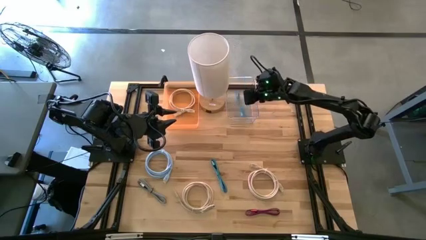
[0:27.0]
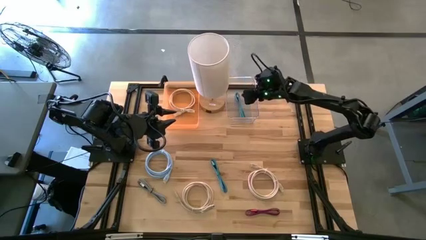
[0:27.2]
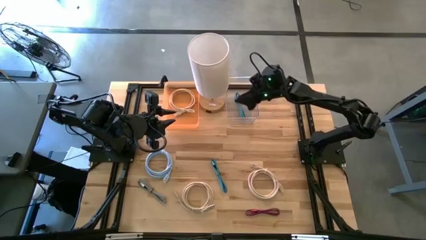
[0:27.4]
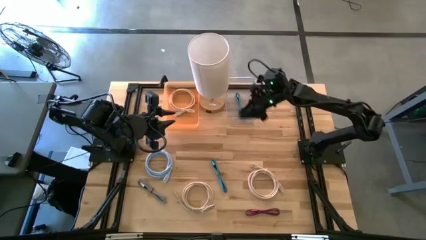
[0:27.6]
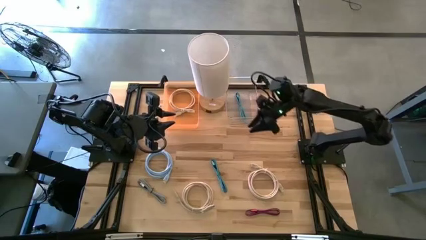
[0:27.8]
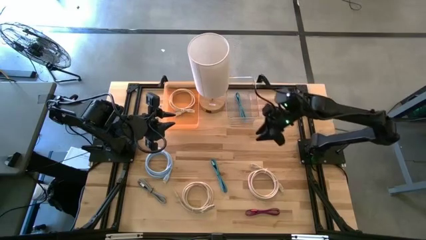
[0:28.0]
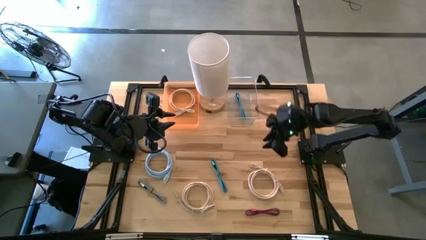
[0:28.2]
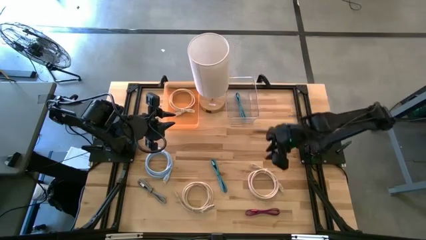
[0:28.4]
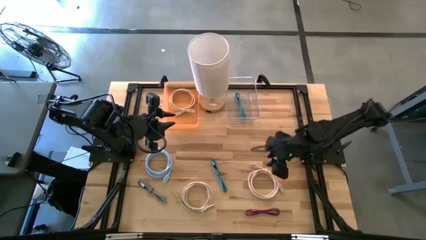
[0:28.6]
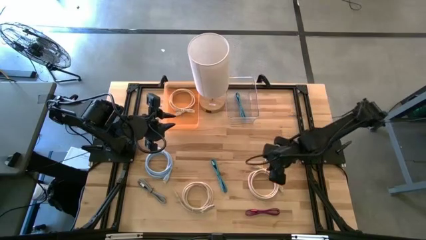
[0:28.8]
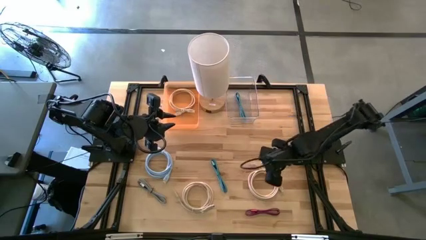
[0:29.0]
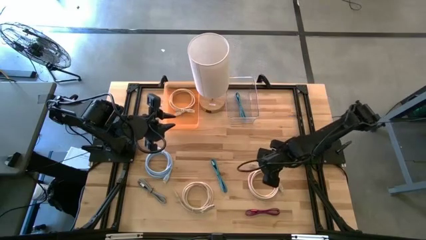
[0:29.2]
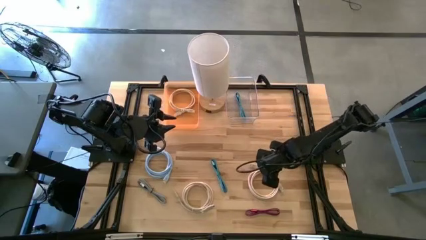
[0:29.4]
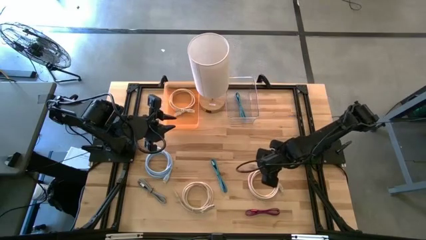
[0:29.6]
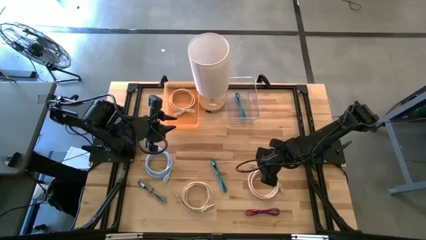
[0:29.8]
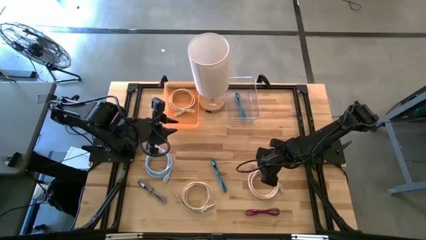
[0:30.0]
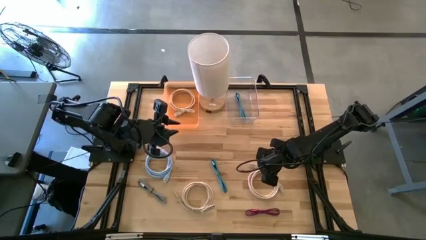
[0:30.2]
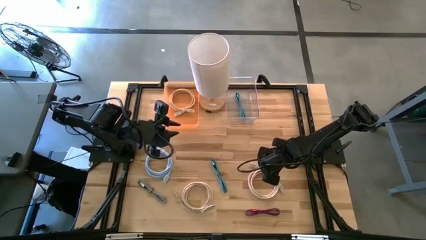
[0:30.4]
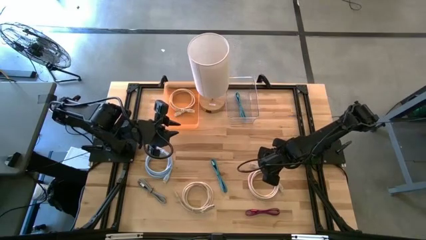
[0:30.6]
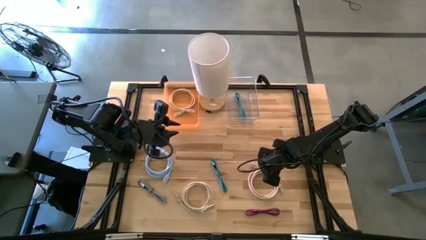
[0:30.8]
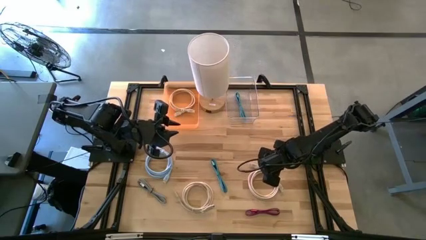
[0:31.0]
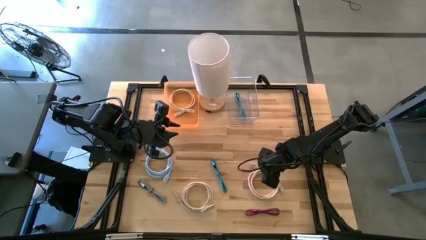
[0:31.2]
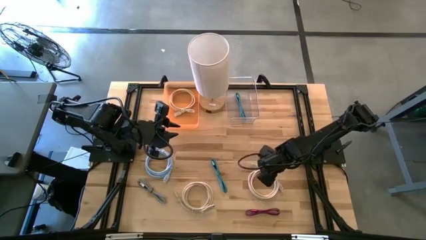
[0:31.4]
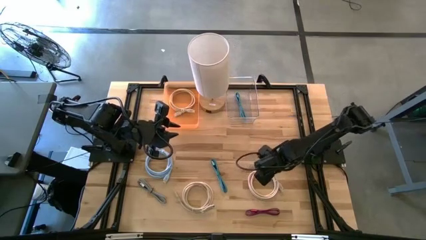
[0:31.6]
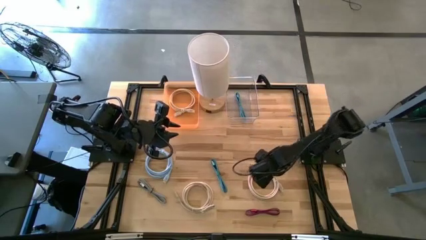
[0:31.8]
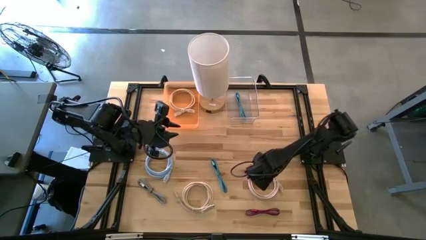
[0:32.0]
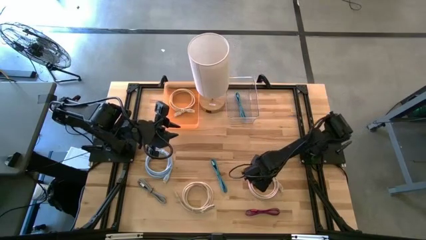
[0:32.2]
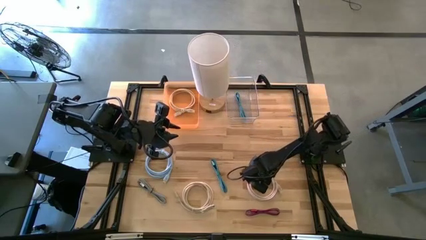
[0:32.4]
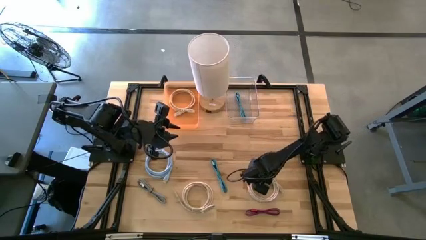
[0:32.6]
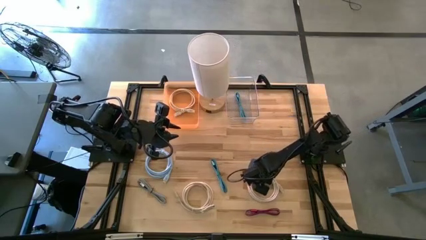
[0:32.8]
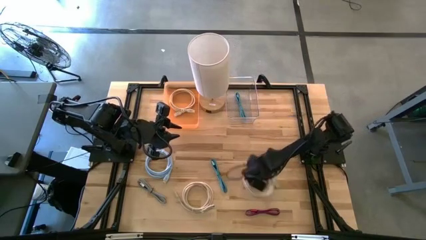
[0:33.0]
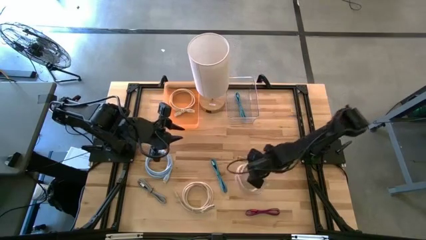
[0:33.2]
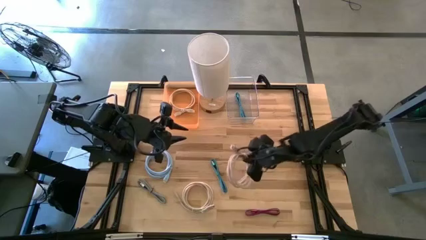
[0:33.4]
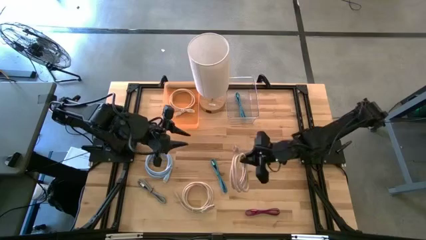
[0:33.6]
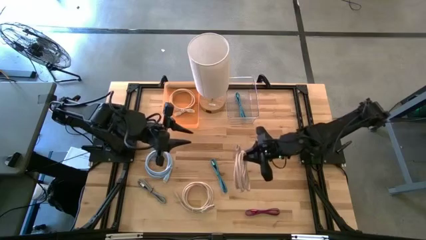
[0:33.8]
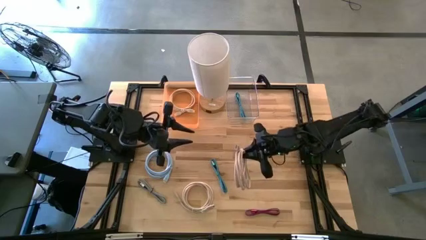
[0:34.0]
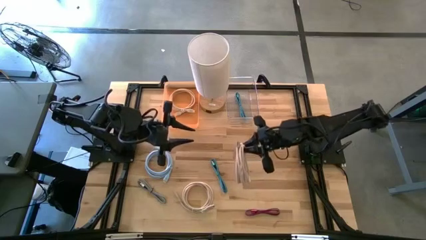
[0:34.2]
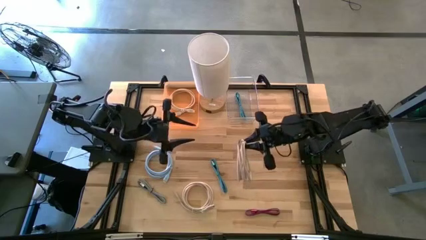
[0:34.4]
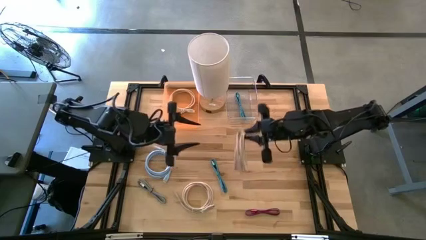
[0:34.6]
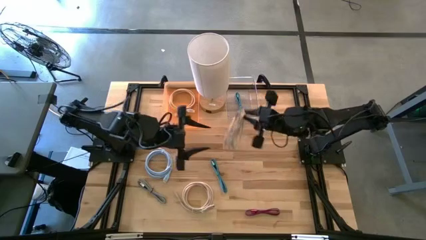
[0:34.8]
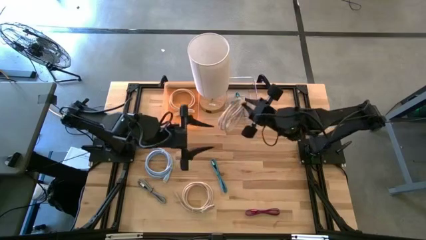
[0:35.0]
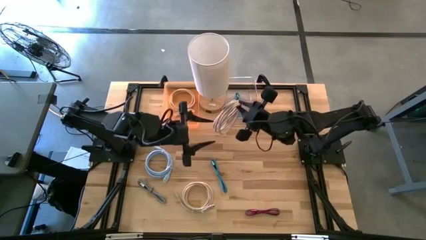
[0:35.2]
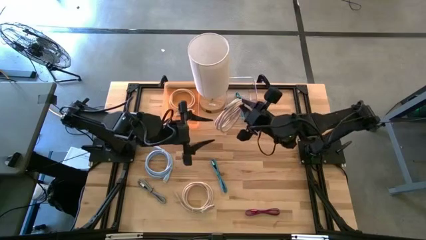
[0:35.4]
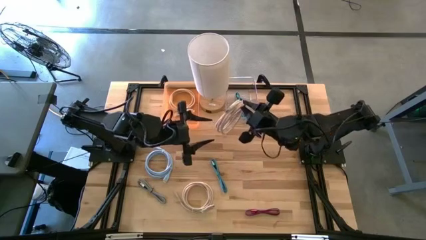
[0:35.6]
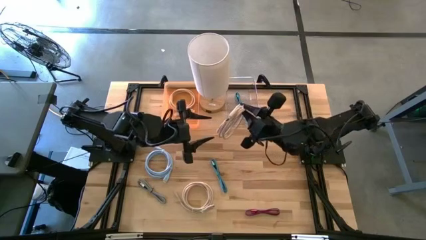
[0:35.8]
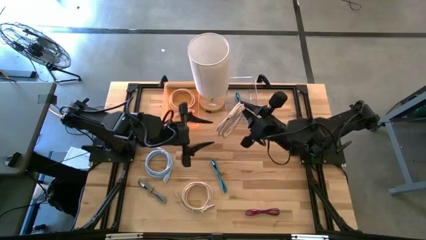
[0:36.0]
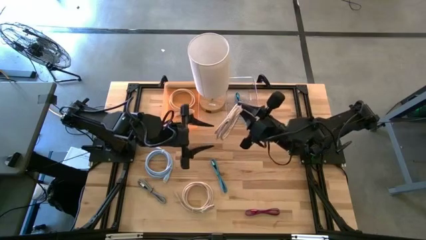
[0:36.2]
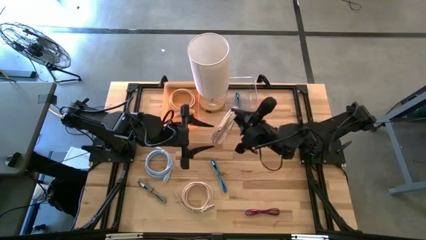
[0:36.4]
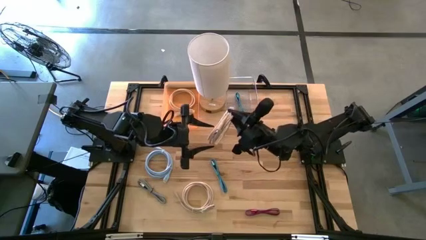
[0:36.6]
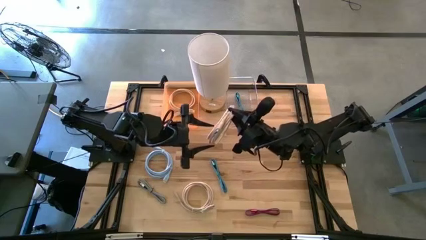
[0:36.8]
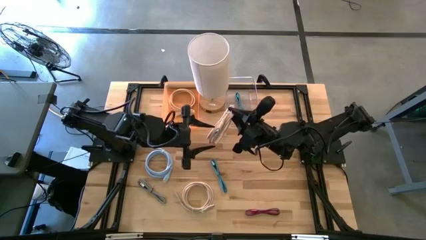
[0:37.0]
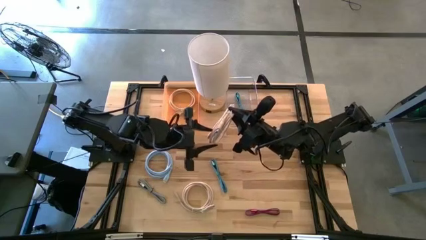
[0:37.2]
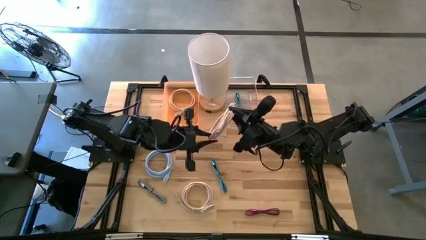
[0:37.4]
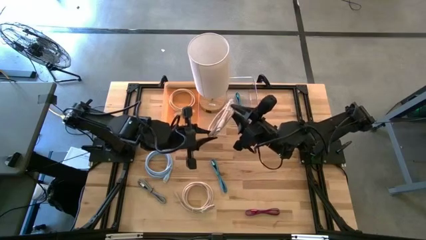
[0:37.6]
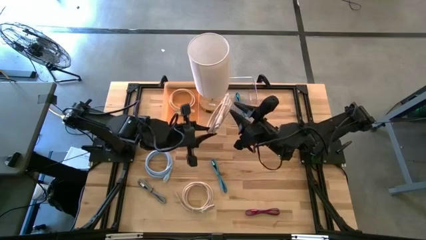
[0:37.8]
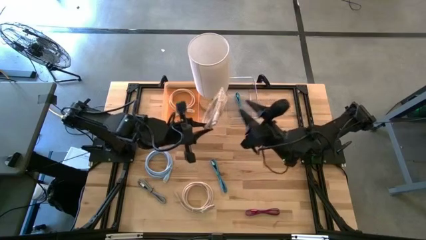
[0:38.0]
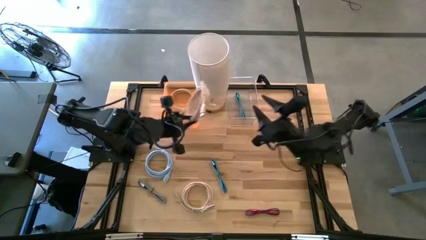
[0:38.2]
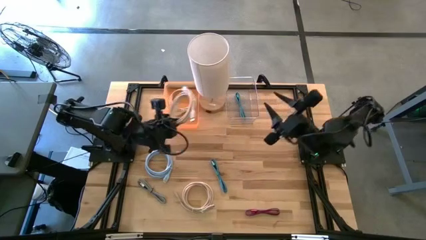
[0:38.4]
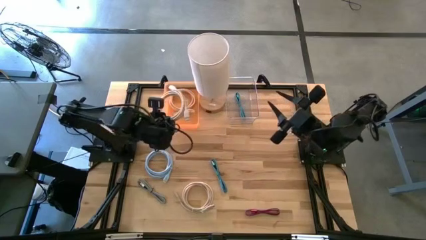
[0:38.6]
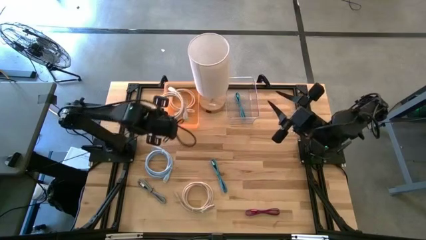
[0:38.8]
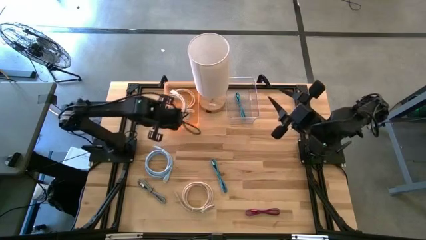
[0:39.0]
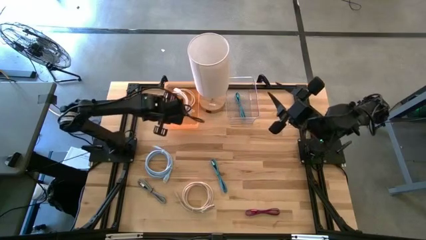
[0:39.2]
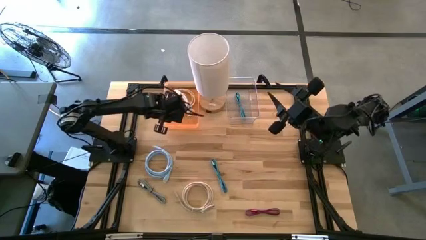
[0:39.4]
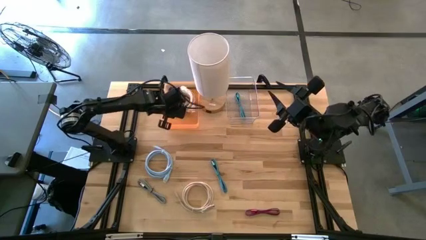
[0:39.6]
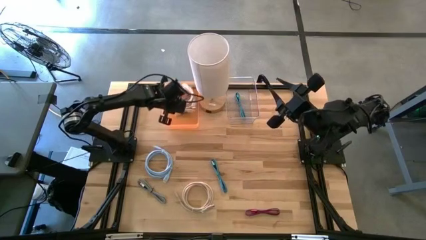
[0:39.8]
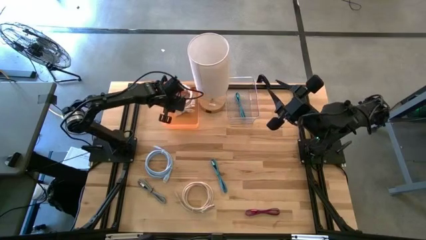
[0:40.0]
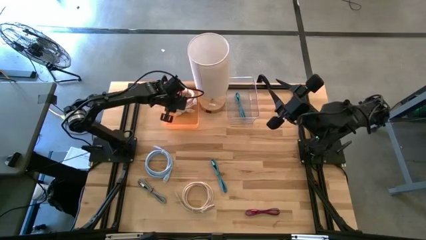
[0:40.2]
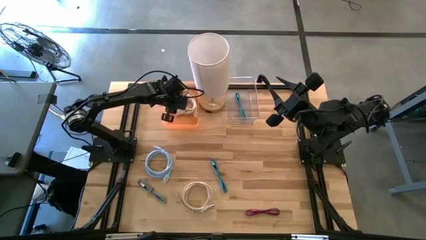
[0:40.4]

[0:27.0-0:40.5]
Task: Pick & Place USB Port
Put the right white usb cable into the orange bin

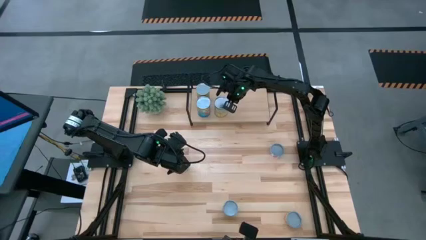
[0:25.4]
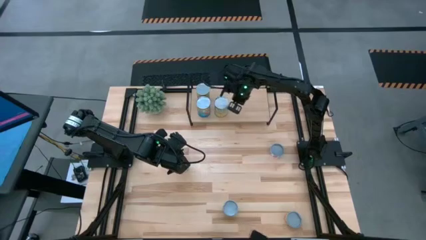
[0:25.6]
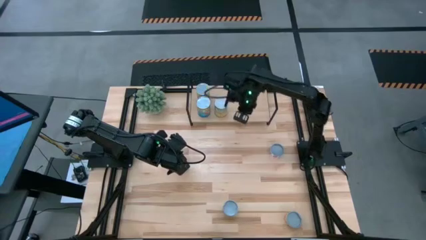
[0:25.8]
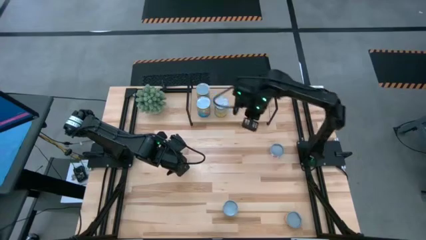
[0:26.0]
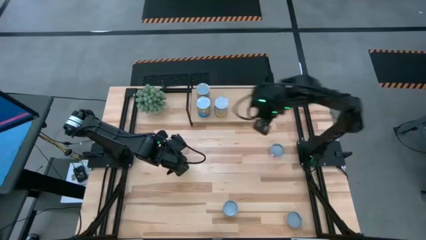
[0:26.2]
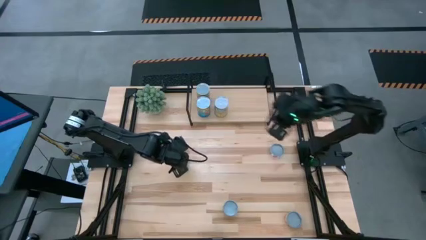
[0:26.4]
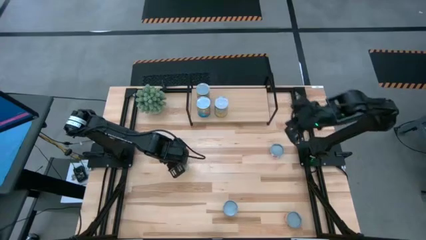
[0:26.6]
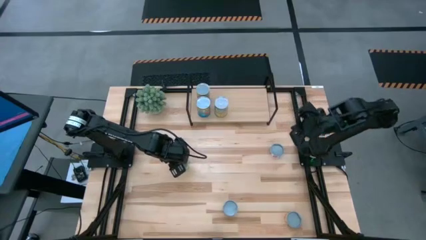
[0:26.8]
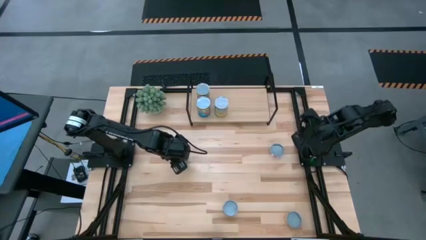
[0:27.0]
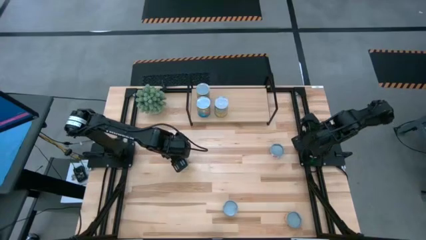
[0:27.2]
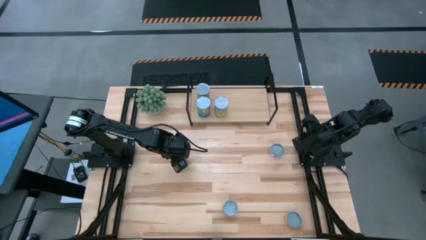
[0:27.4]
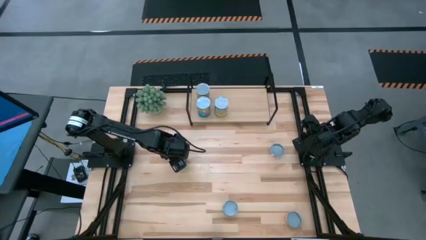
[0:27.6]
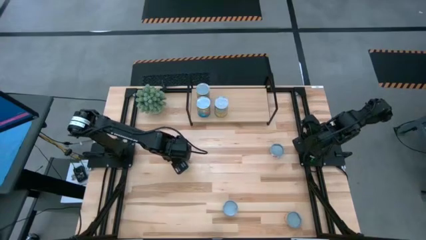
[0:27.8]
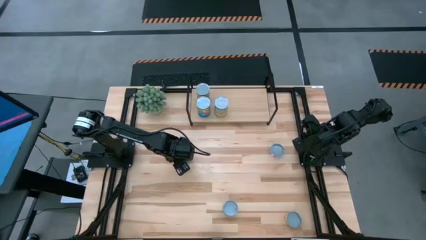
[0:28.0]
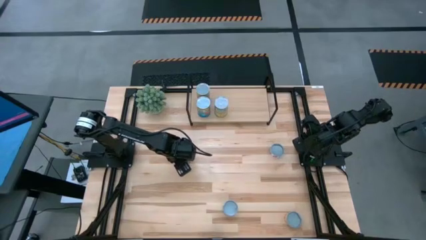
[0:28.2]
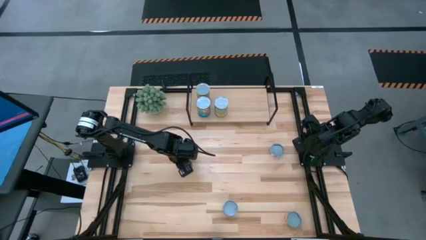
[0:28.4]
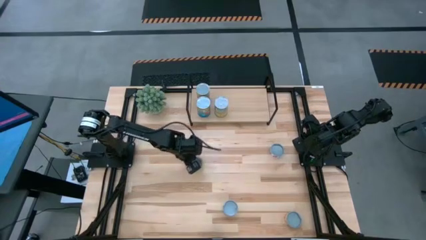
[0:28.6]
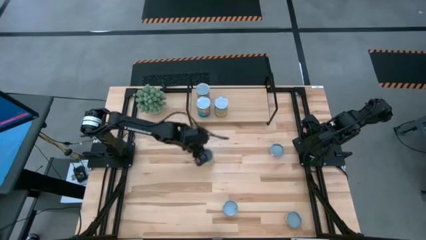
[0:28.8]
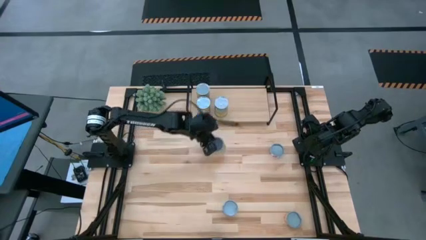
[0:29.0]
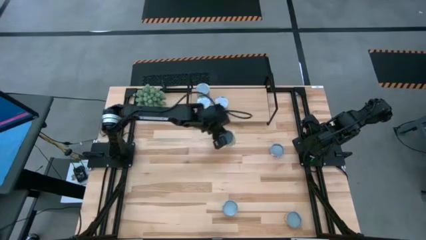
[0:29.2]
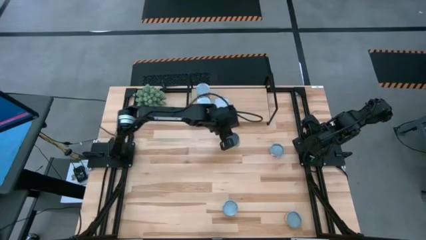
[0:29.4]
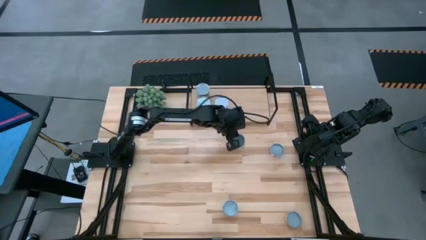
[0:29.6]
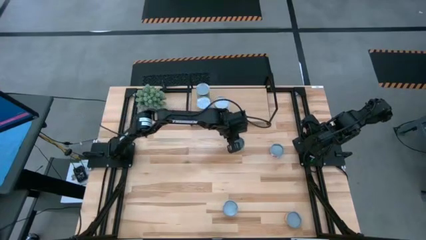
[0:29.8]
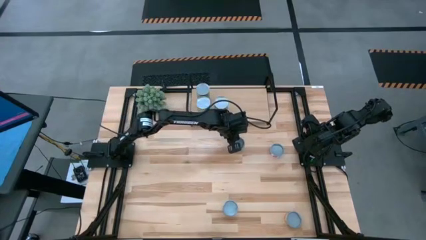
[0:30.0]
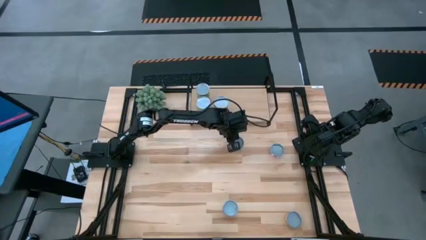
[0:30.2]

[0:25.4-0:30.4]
Task: Pick and place cans onto a shelf
Move the canned peas to the center of the table
